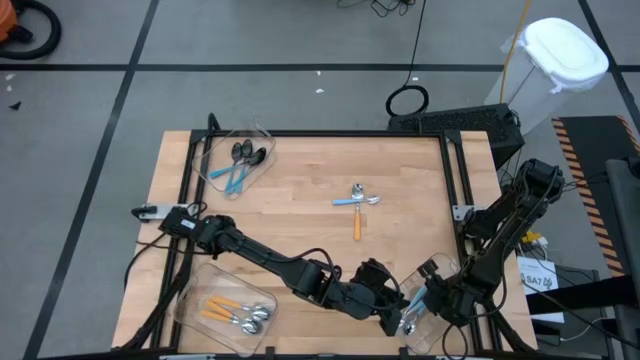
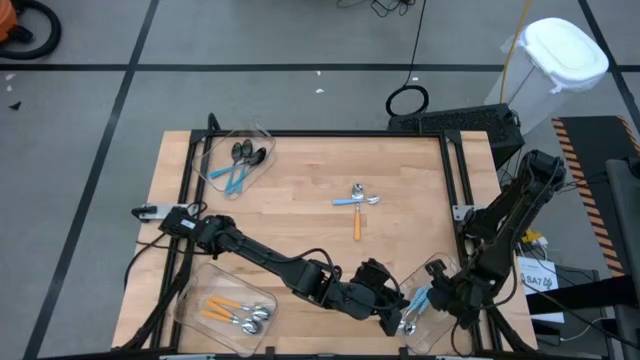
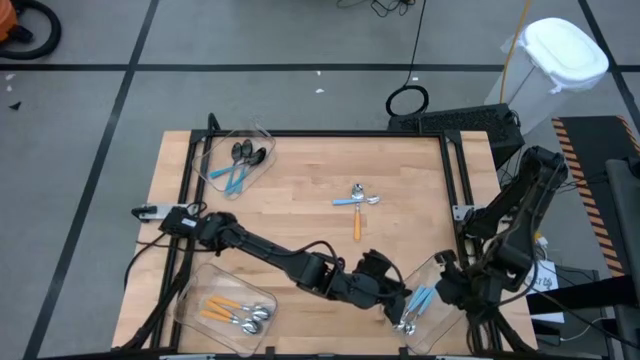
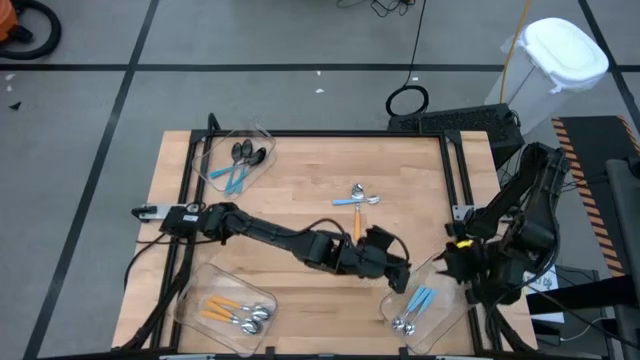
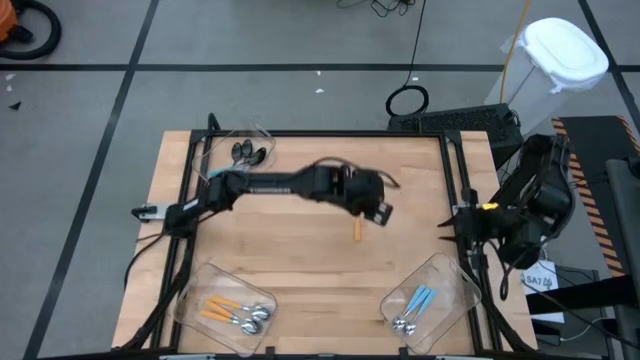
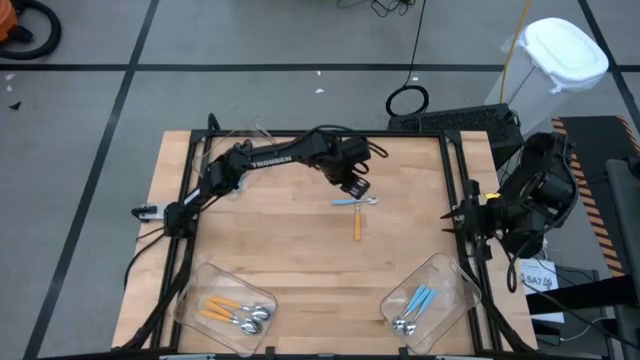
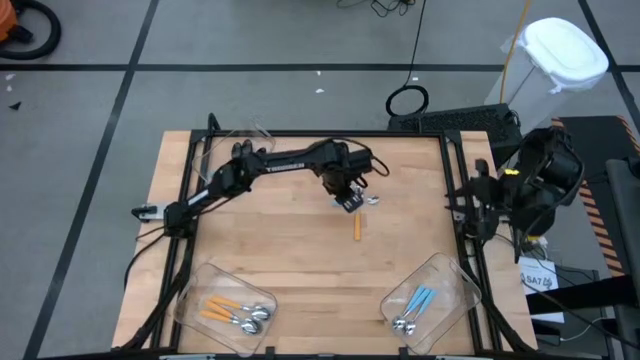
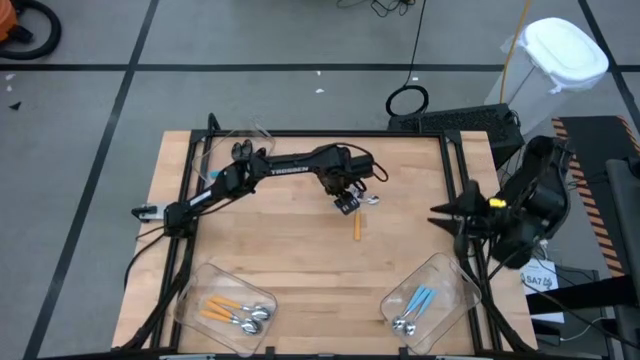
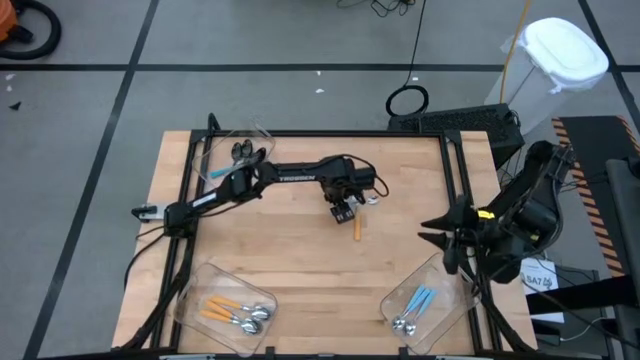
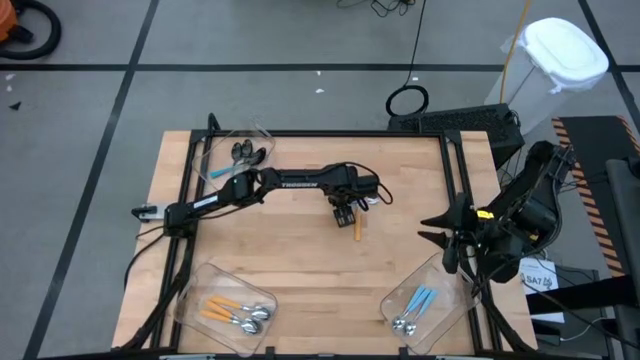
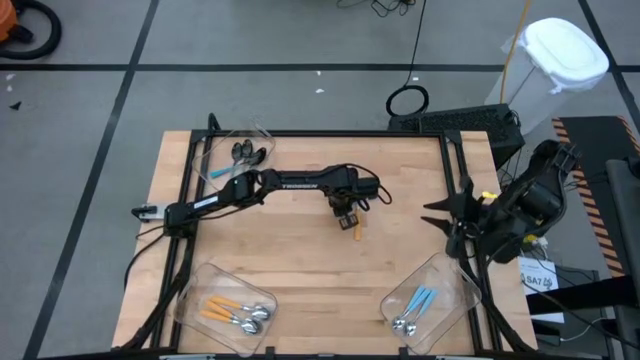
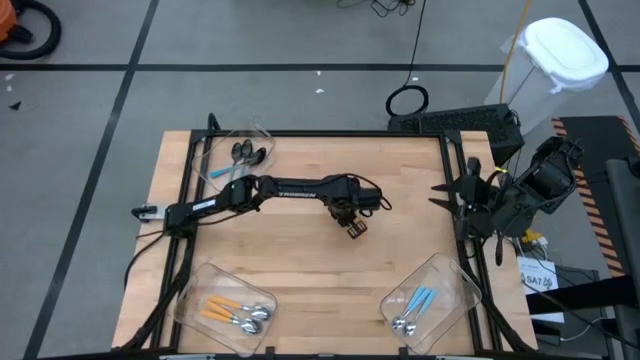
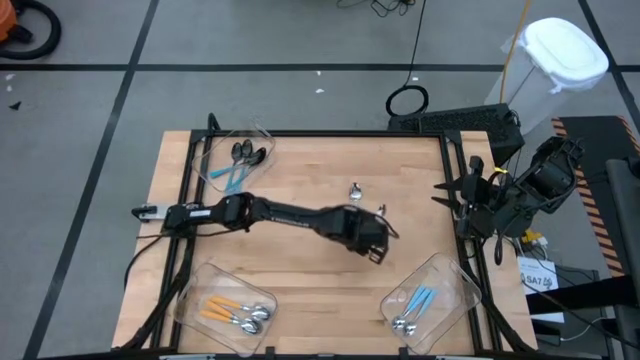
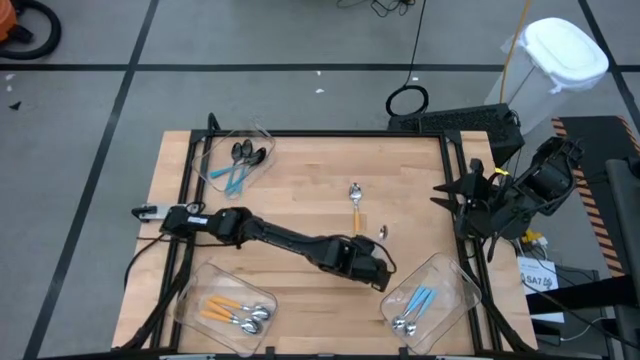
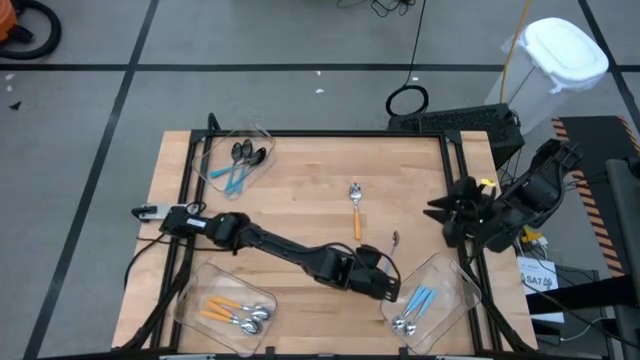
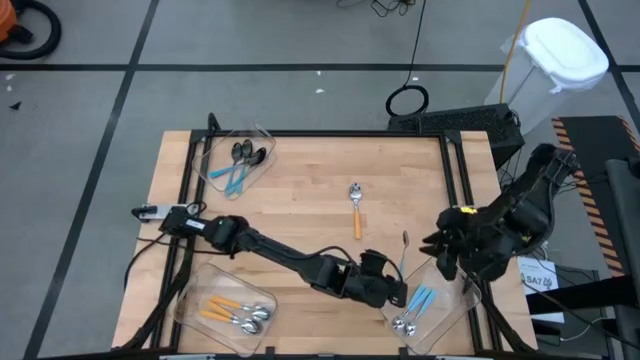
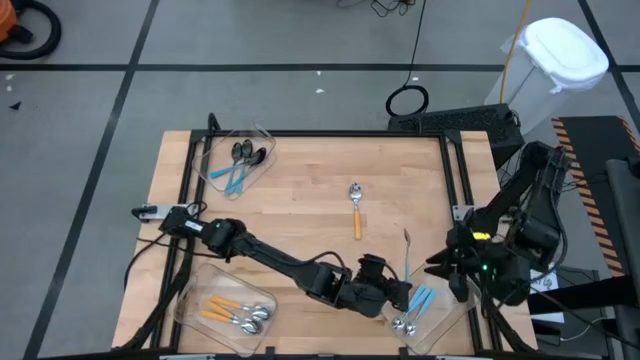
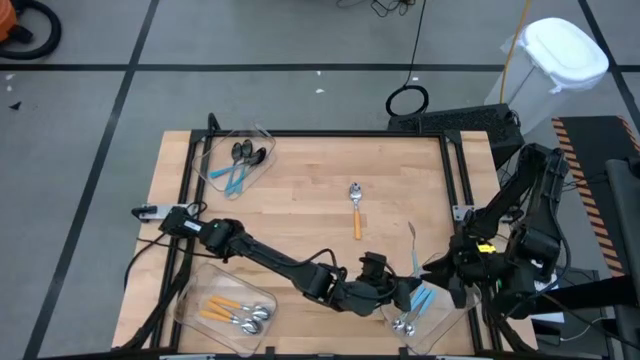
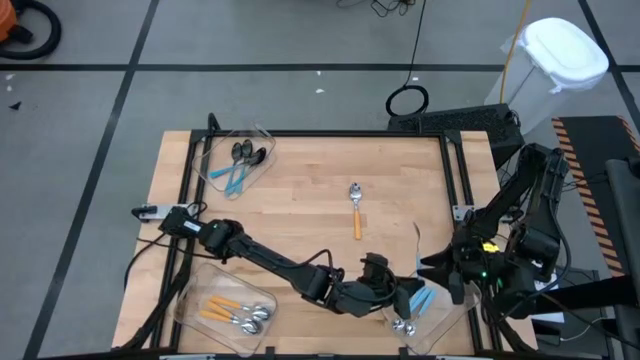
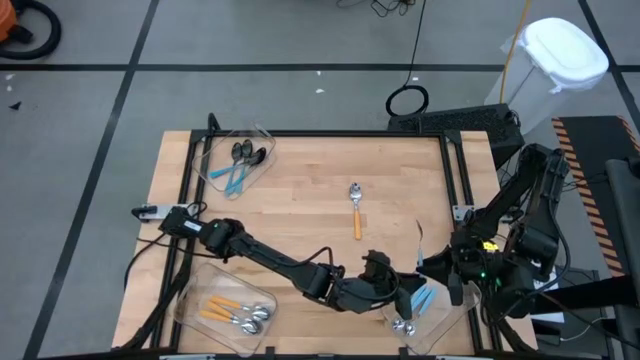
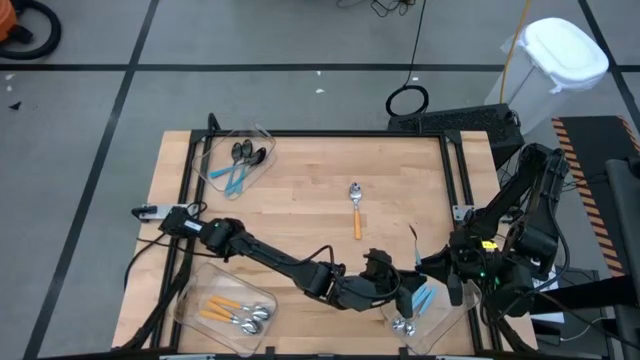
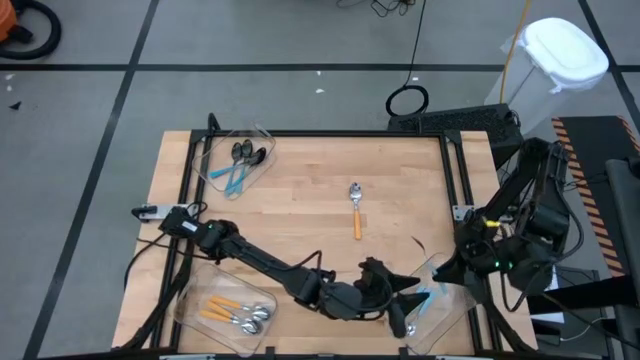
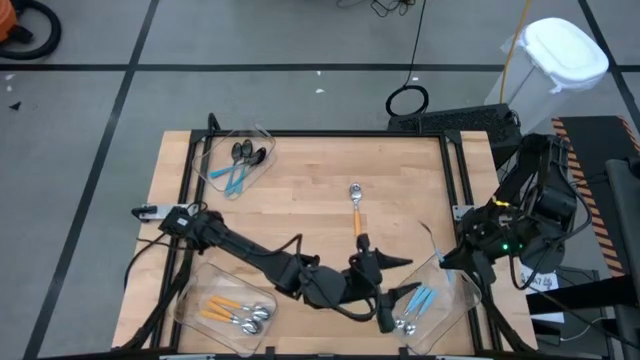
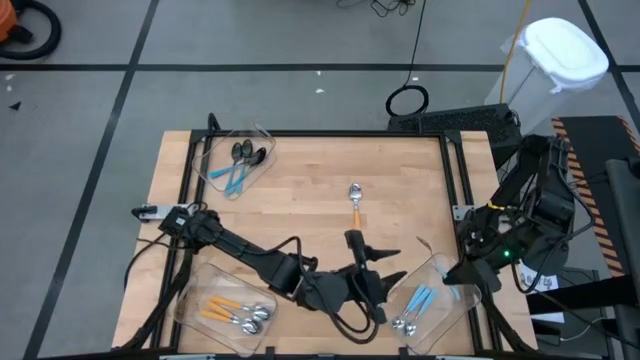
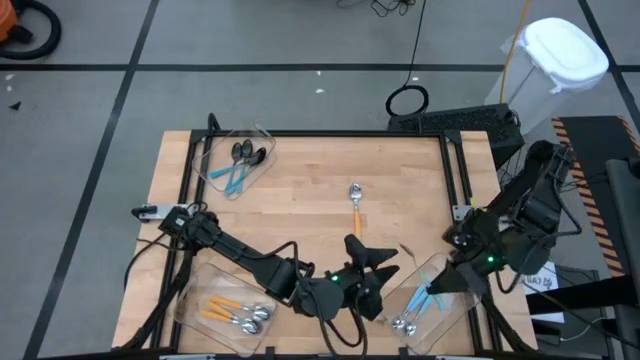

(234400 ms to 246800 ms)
Task: Sort silverware by color (type)
Put the light blue spoon into the bottom right transparent bin

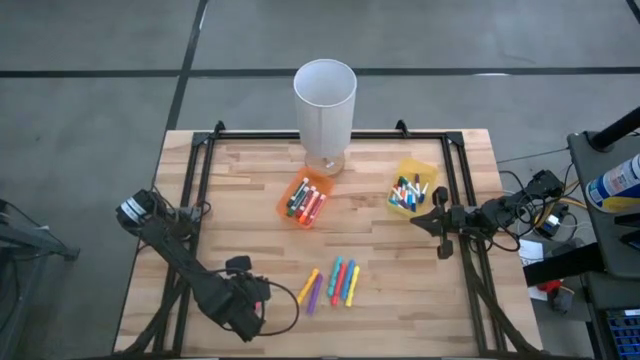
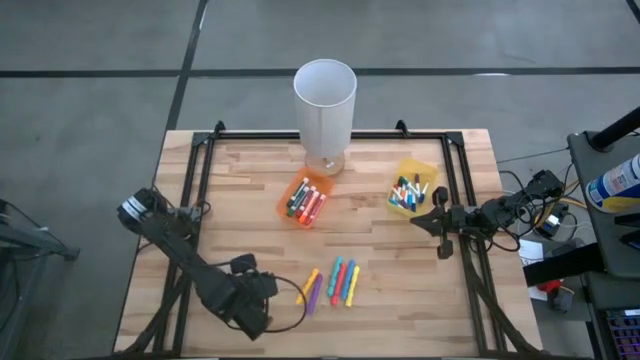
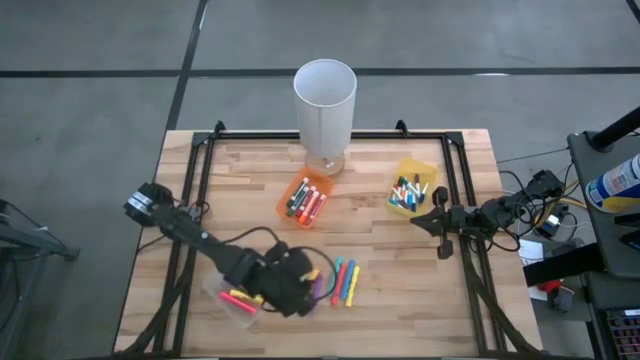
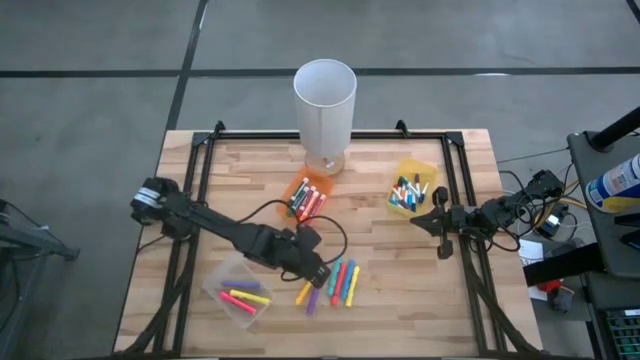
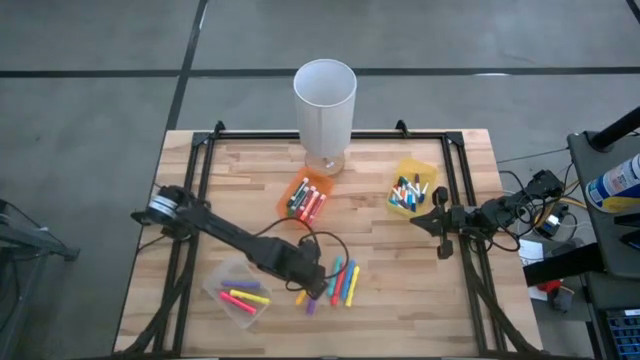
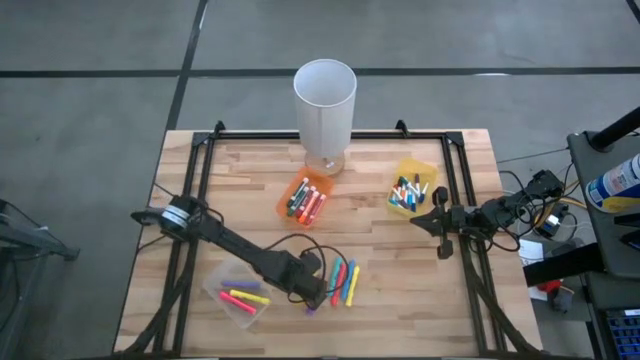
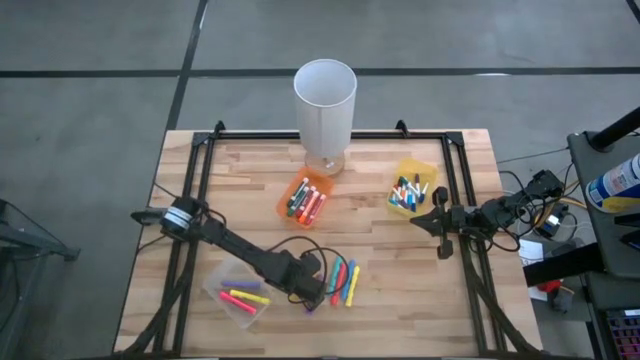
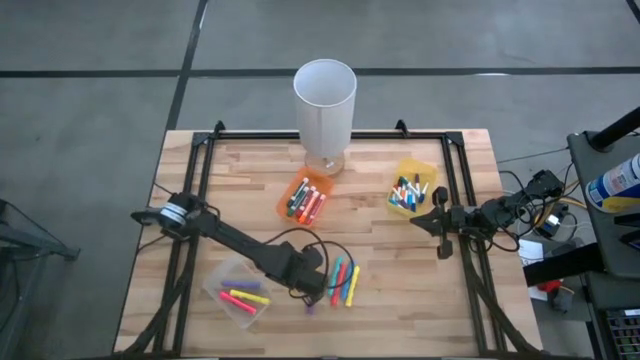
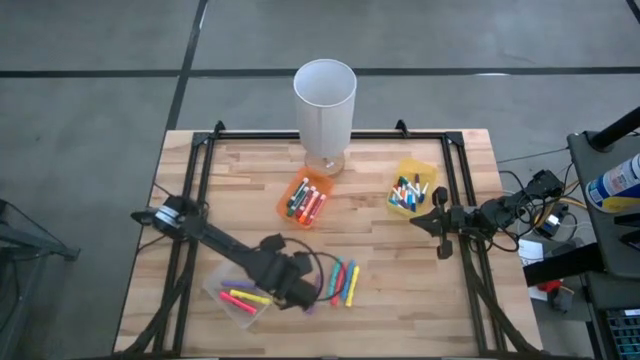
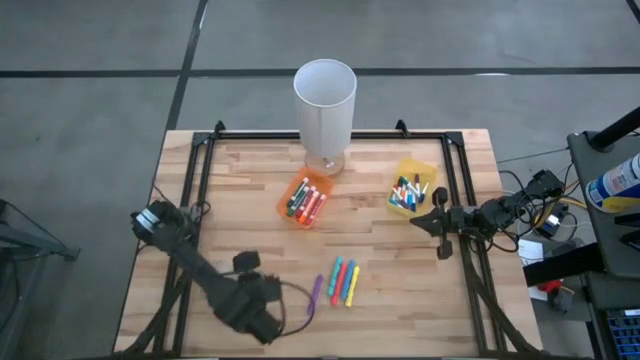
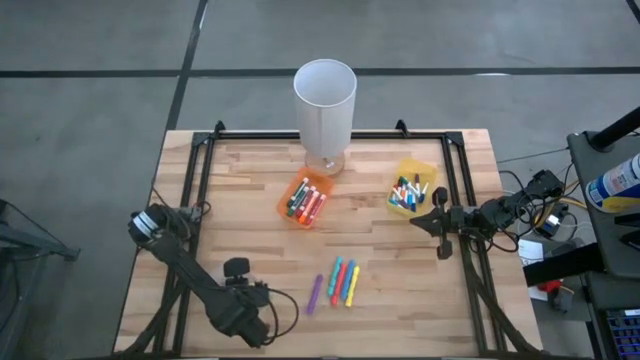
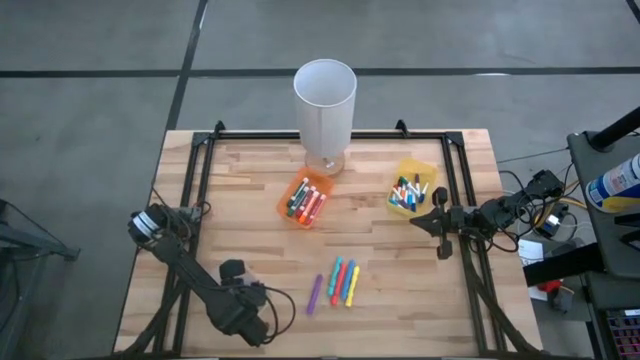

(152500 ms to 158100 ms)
Task: Pick & Place Markers
Put the yellow highlighter pen into the white bin

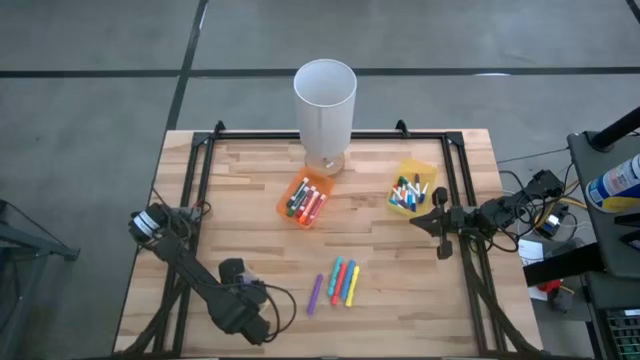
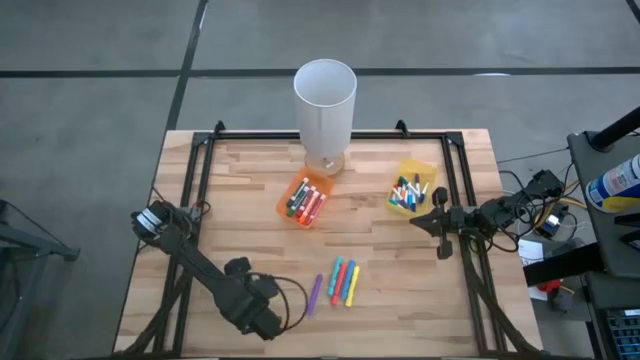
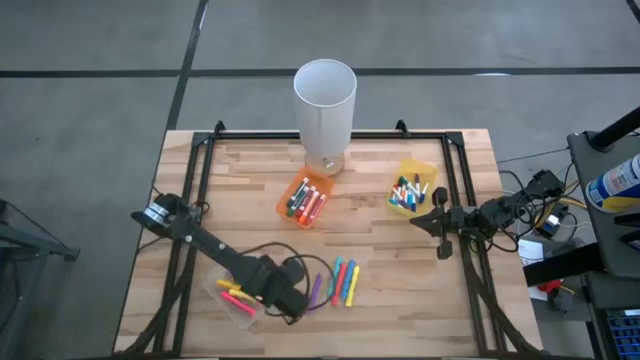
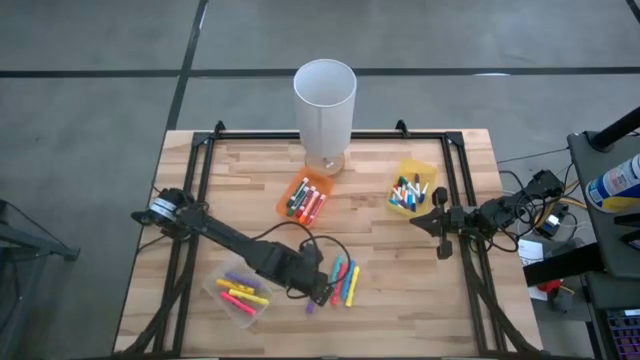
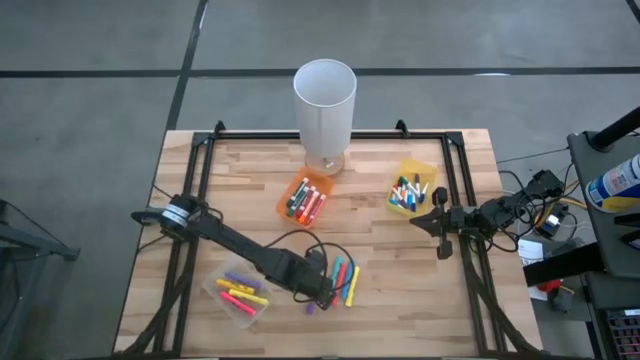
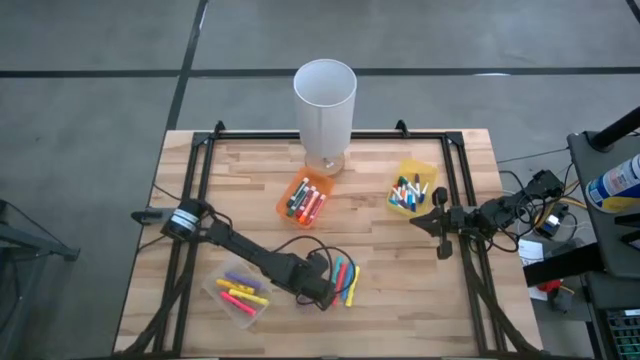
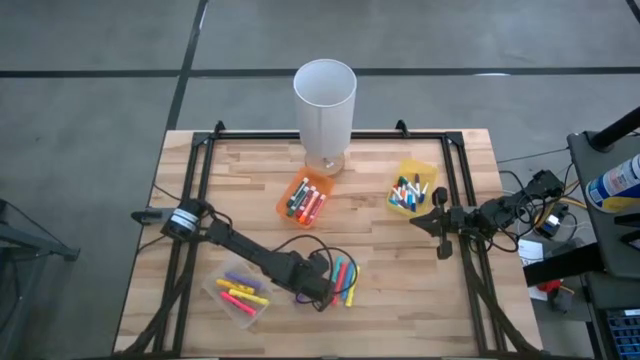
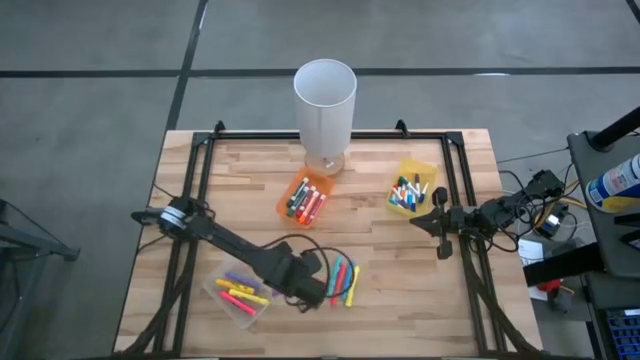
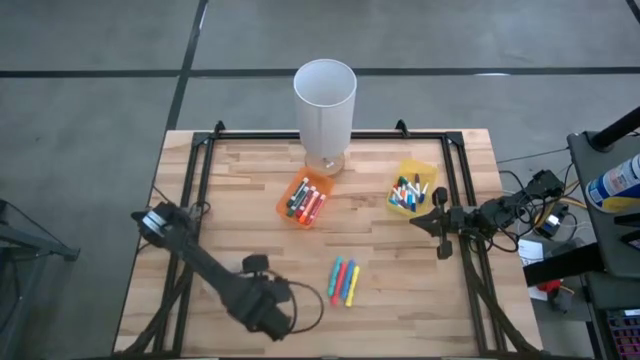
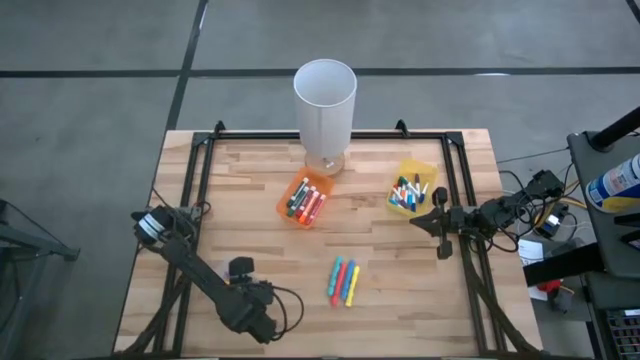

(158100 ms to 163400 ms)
Put the purple highlighter pen into the white bin
